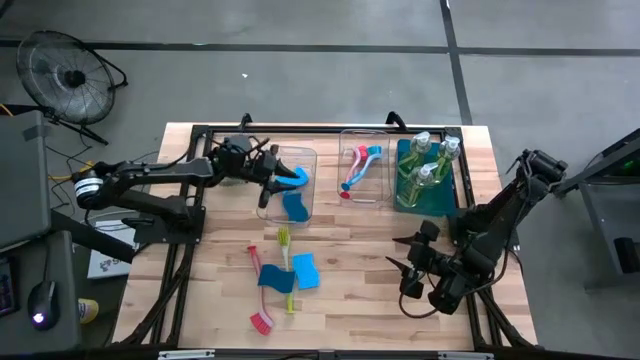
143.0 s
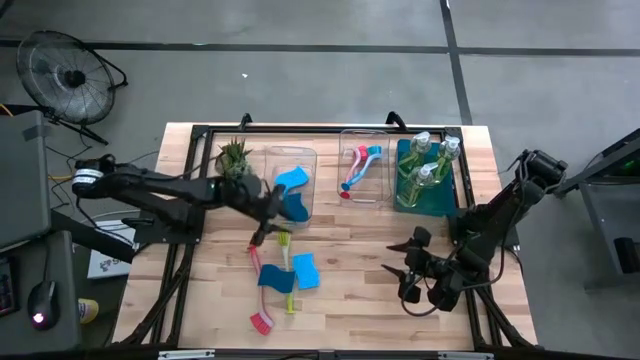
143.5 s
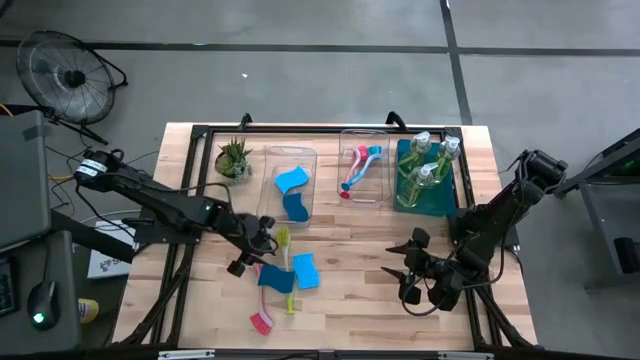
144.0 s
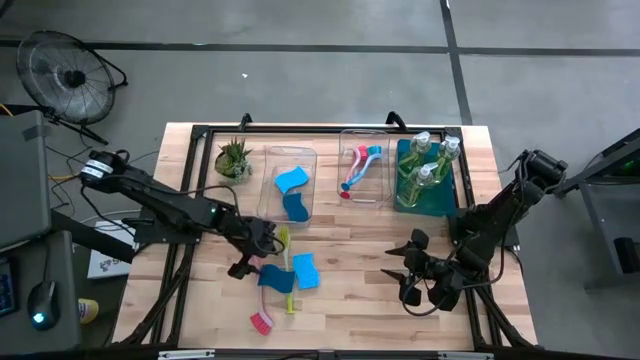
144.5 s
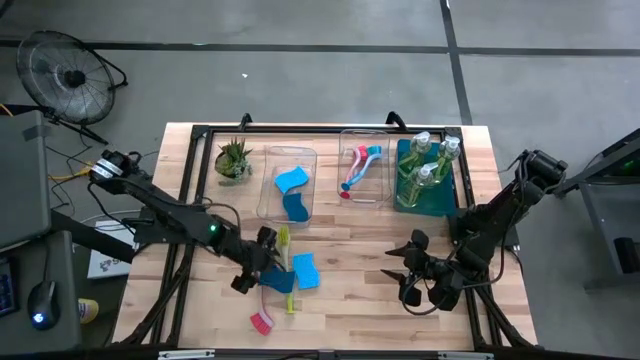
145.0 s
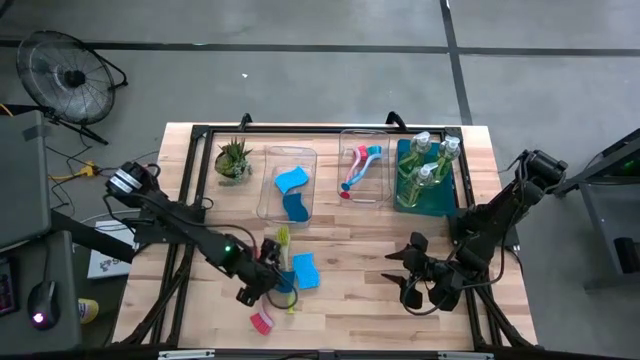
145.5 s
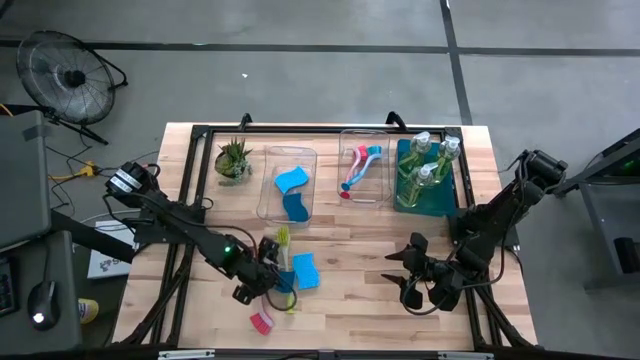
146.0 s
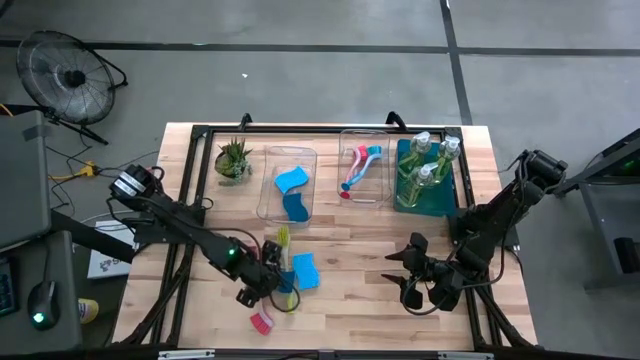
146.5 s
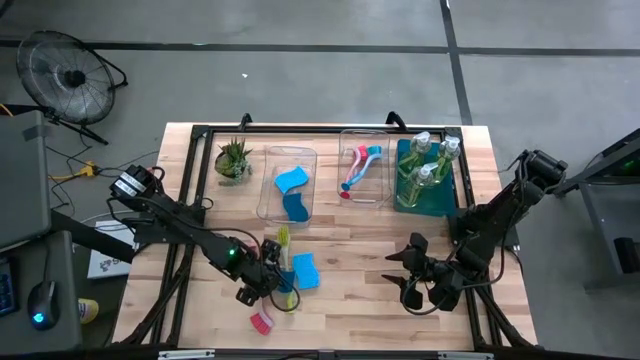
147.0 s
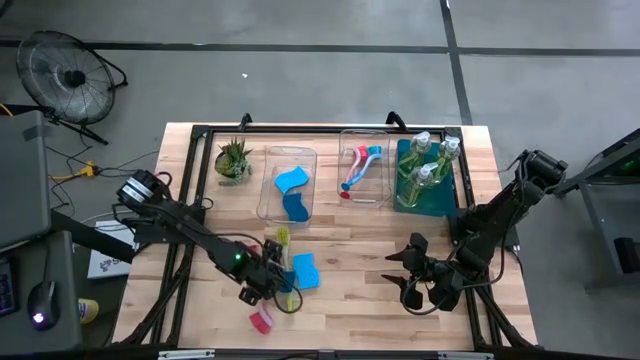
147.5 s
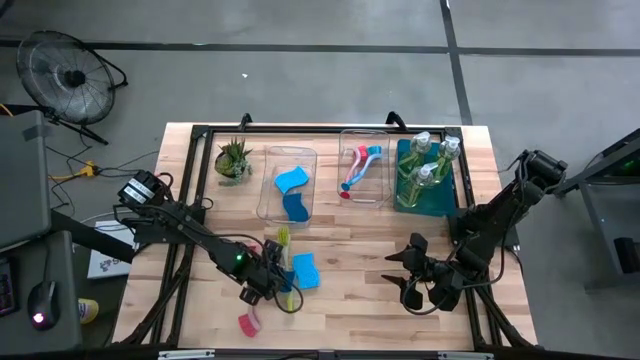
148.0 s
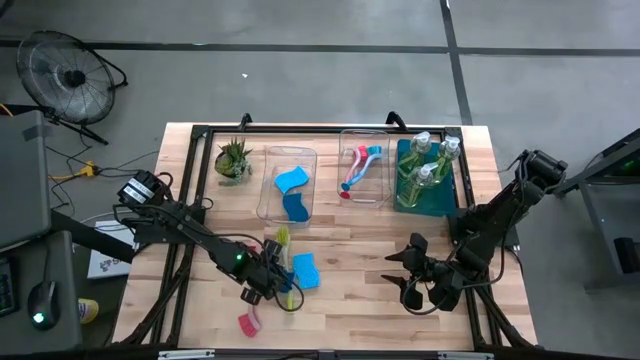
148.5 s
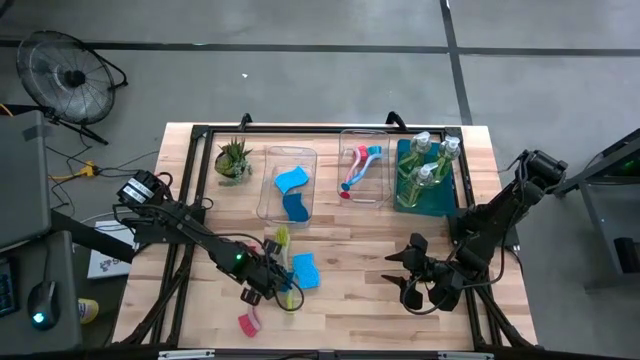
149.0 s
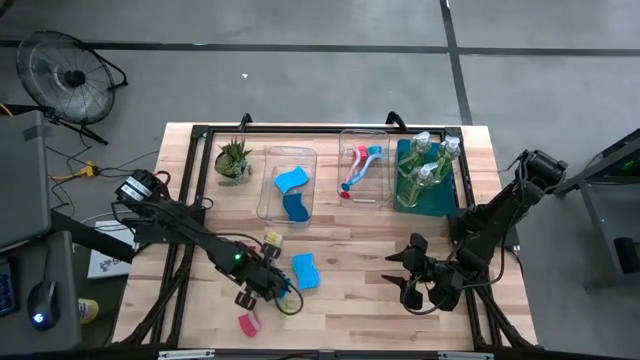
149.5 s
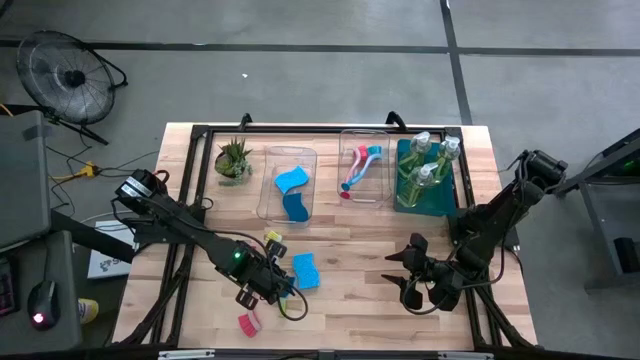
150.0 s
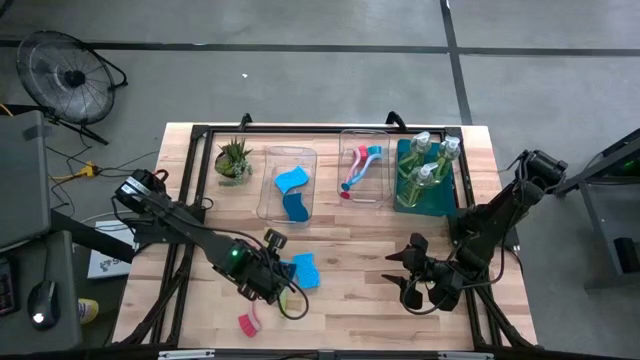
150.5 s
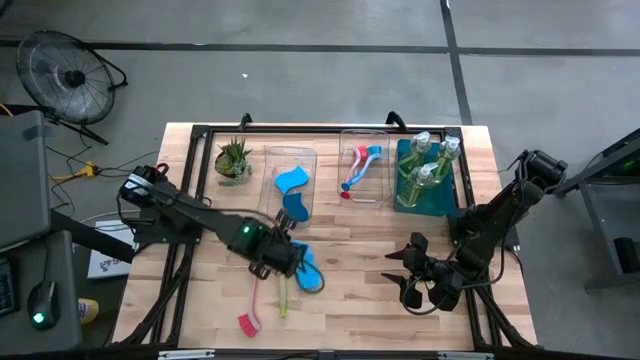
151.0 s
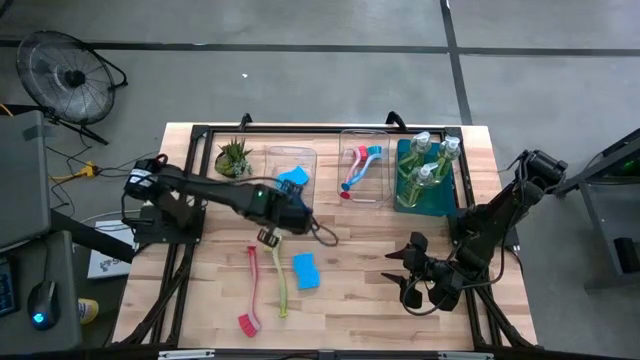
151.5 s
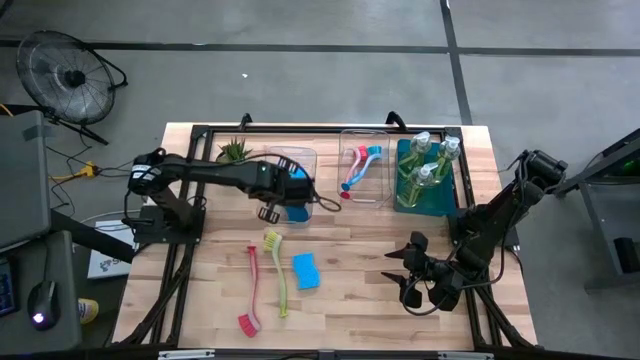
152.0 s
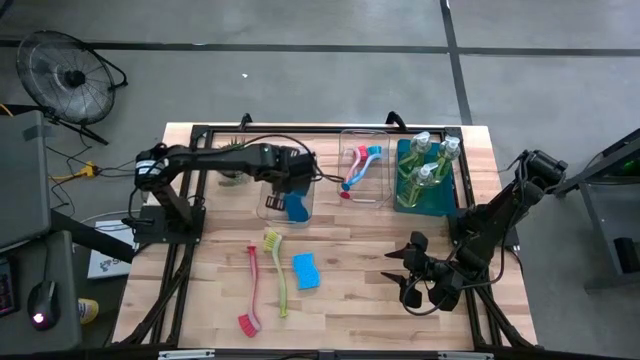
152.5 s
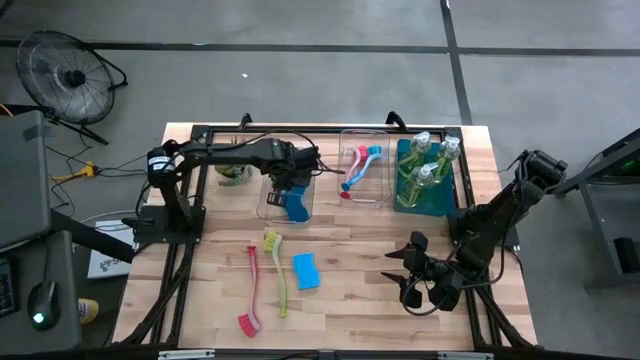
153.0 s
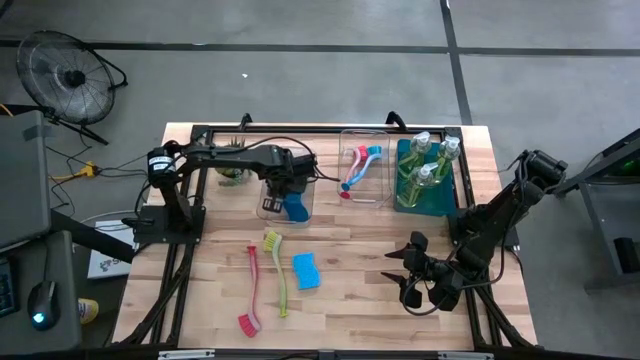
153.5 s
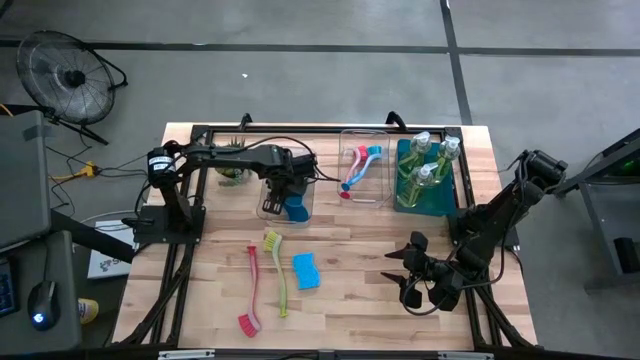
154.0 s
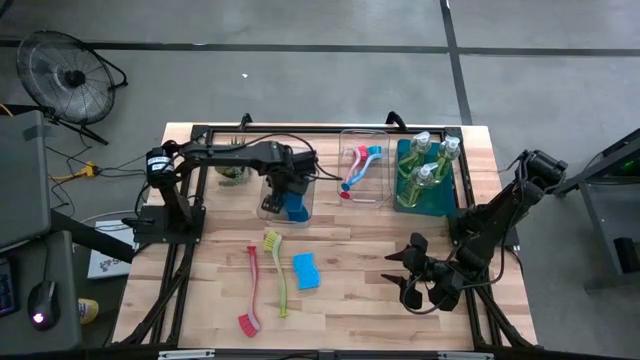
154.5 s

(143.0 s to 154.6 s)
Task: Pick & Place Kitchen Sink Supplies
Put the left blue dishwashing sponge into the left transparent bin

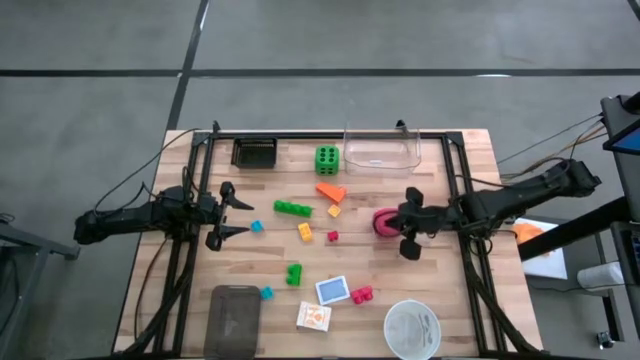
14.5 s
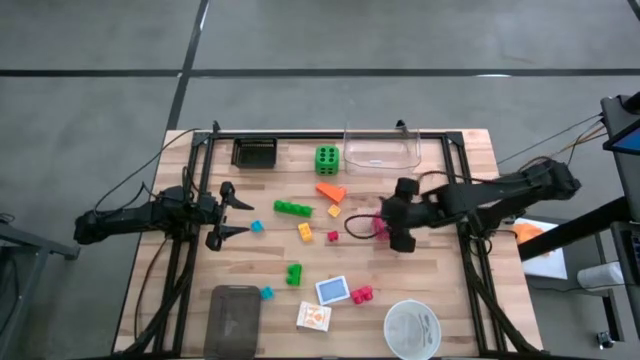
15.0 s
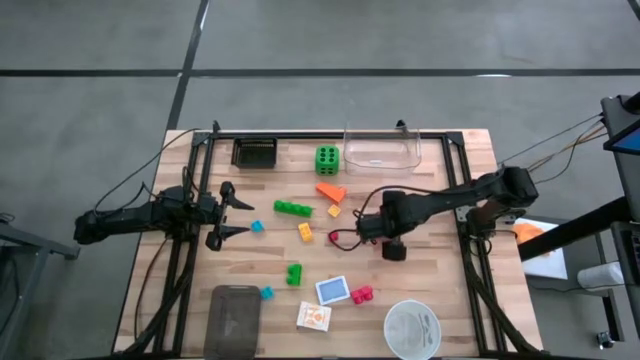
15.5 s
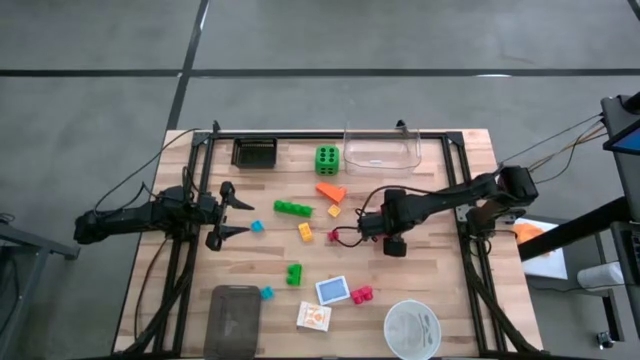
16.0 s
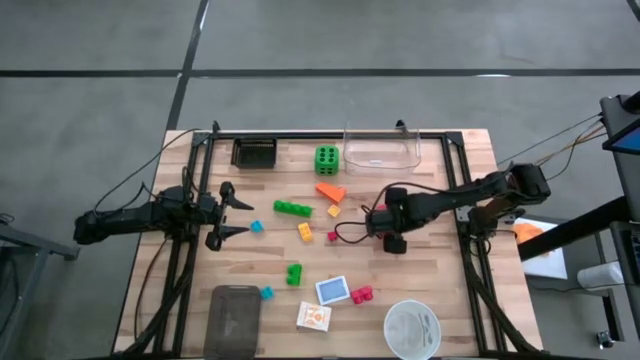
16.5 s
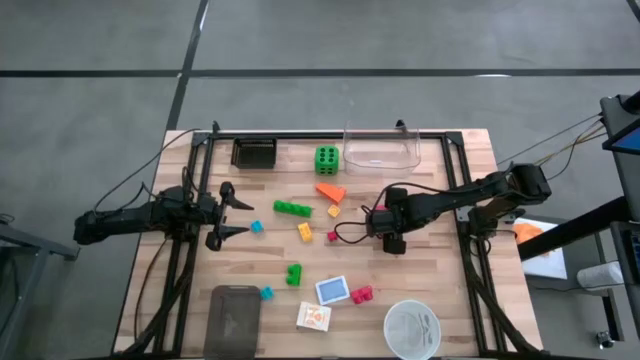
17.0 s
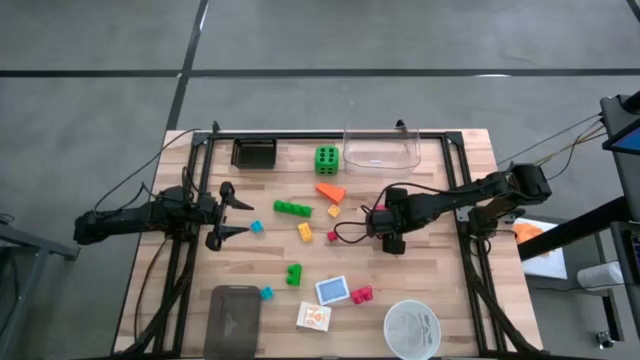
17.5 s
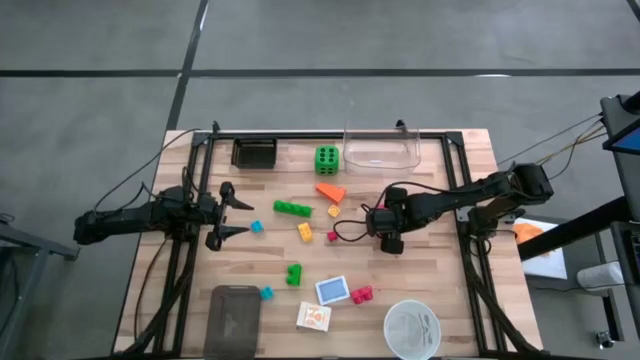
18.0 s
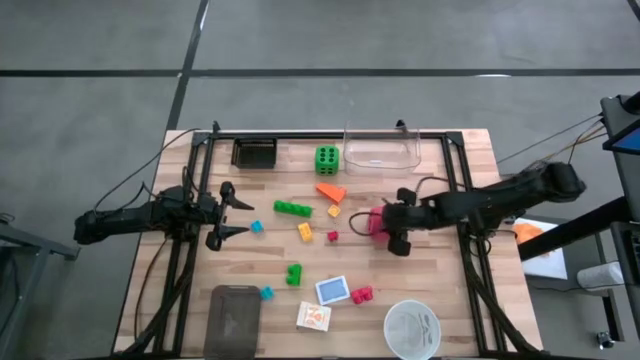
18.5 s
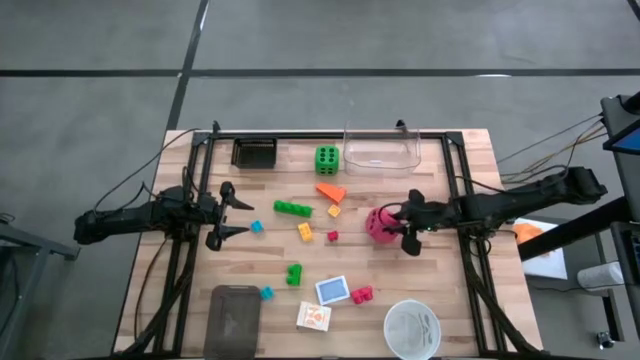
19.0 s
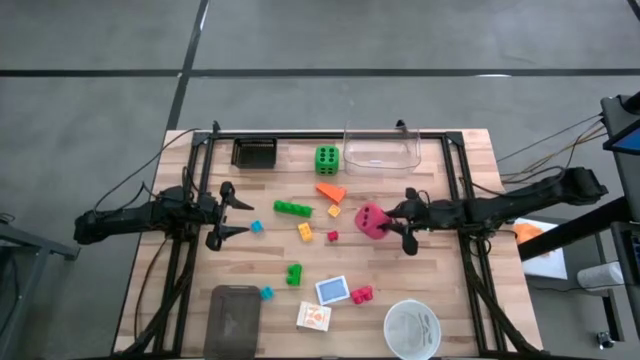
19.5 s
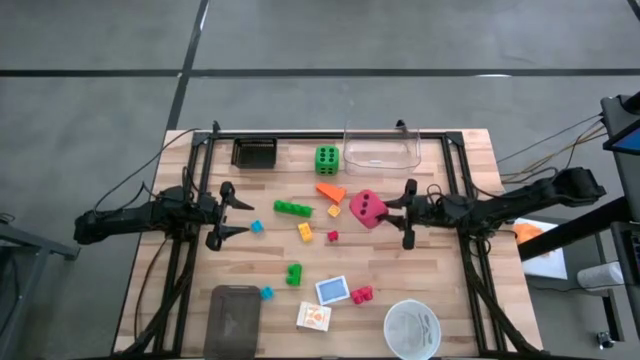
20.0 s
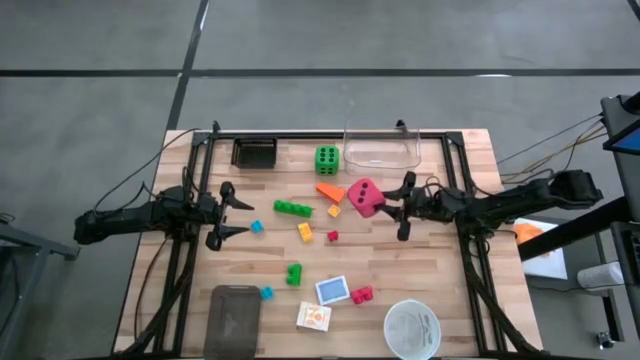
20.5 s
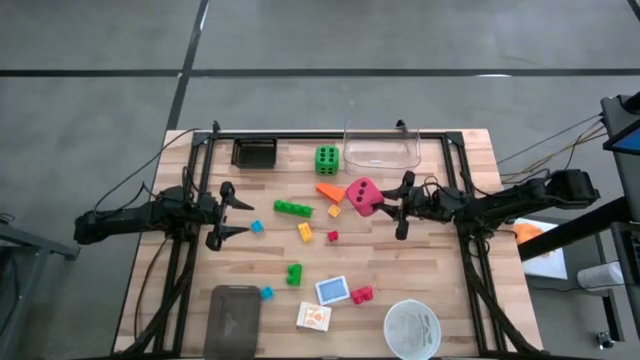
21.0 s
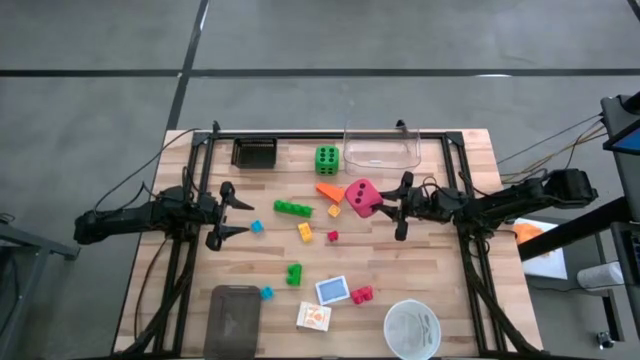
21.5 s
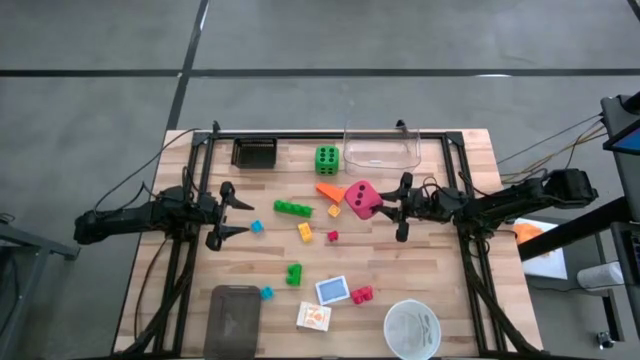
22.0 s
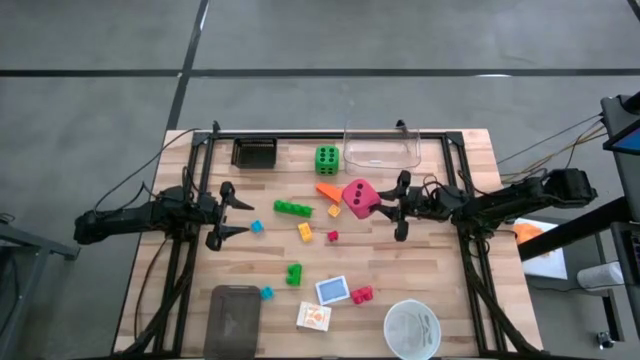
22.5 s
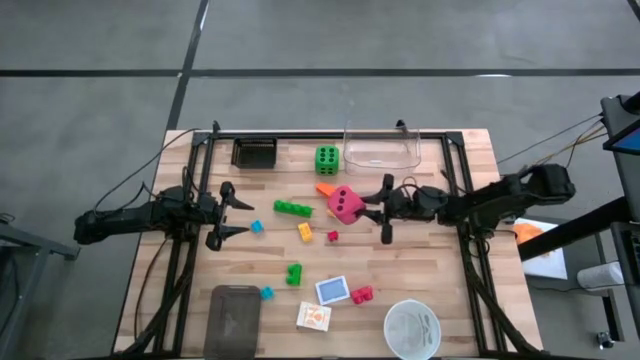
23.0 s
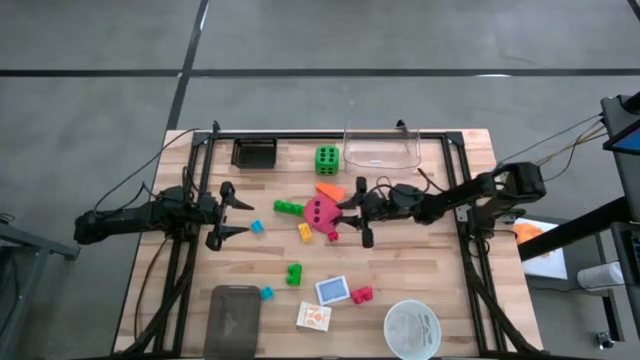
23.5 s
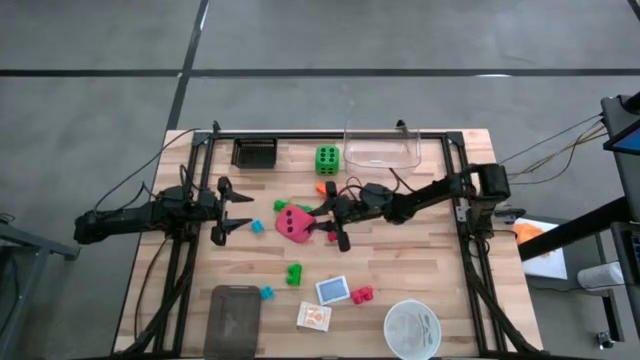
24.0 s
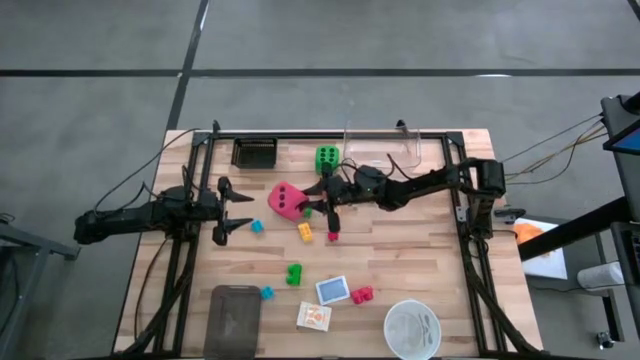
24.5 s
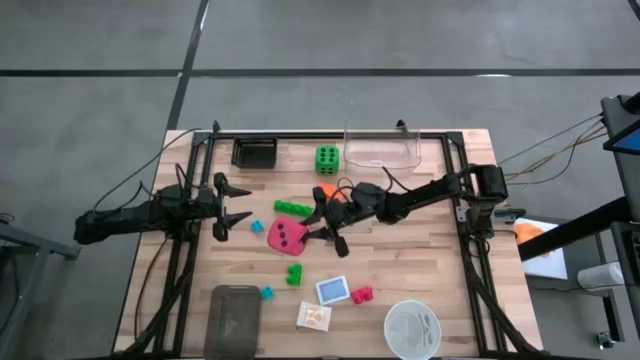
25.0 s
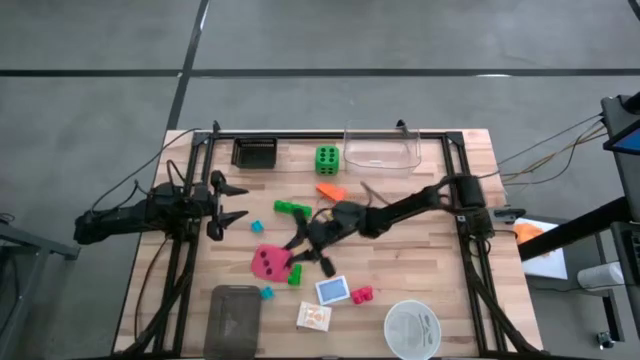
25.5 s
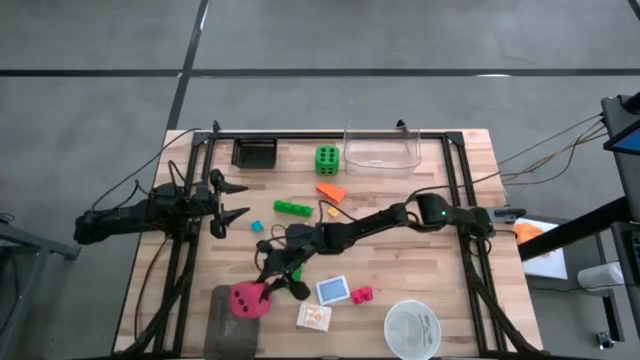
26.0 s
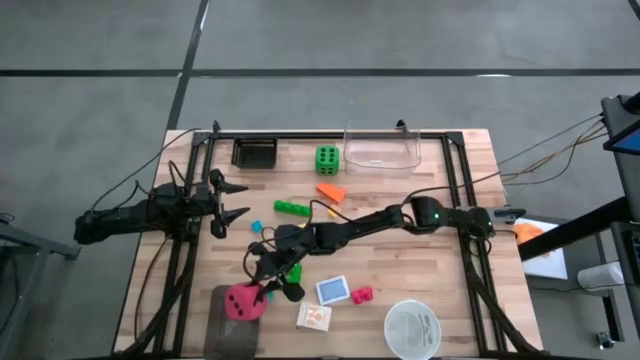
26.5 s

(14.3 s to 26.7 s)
Task: Pick & Place Toys
Put the red die into the gray bin
